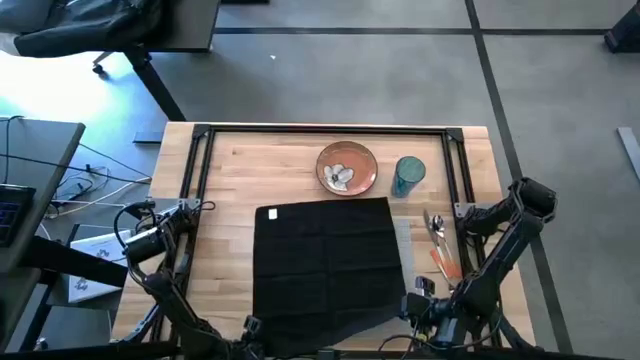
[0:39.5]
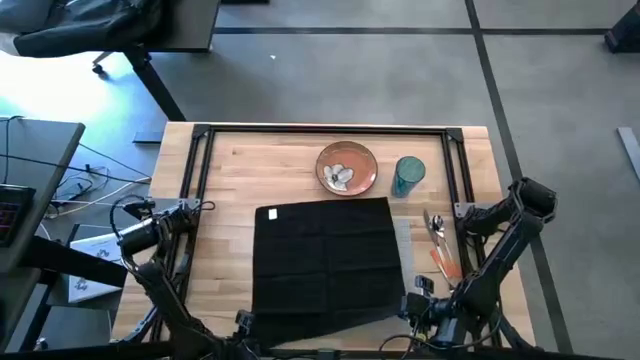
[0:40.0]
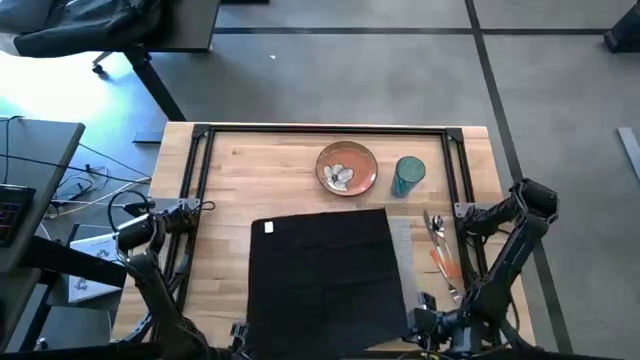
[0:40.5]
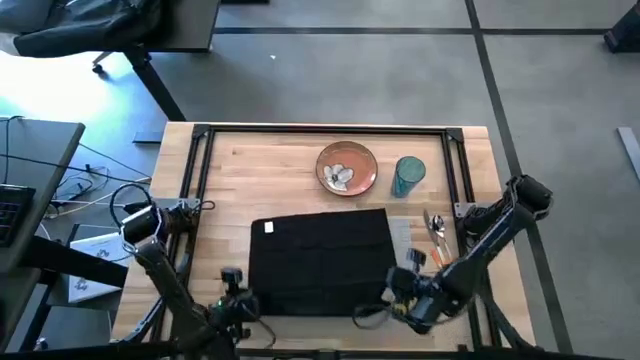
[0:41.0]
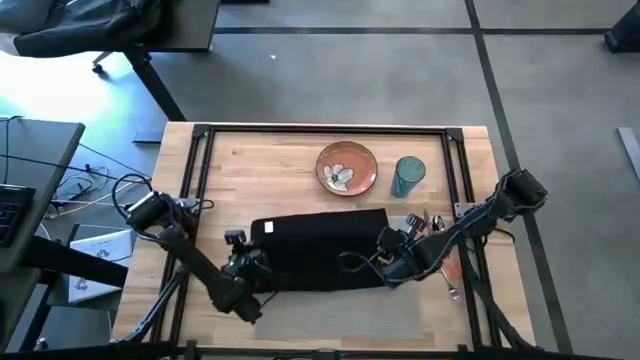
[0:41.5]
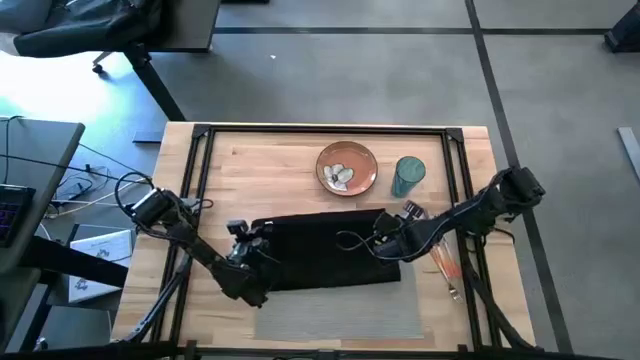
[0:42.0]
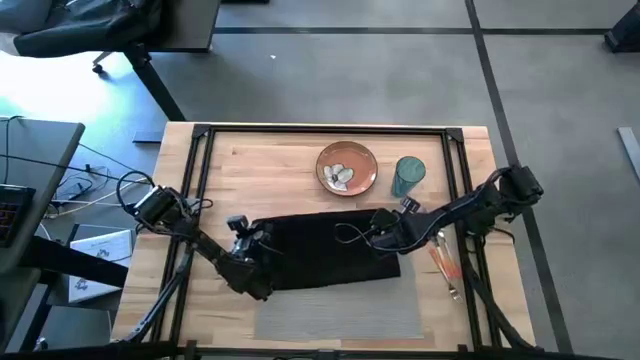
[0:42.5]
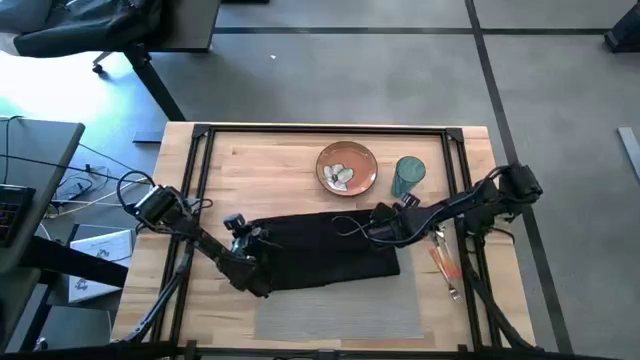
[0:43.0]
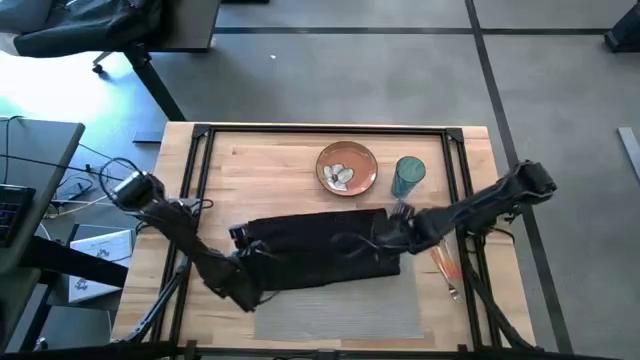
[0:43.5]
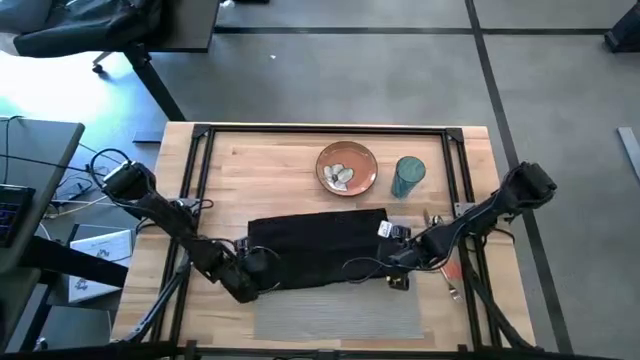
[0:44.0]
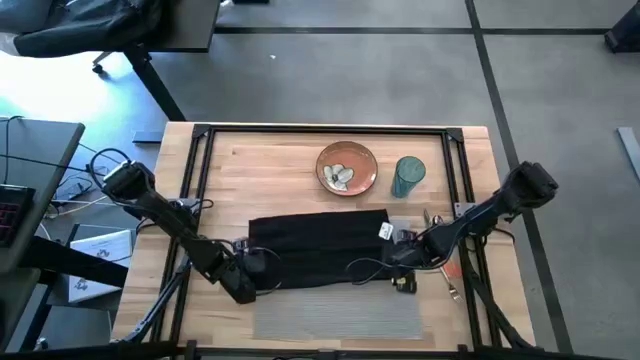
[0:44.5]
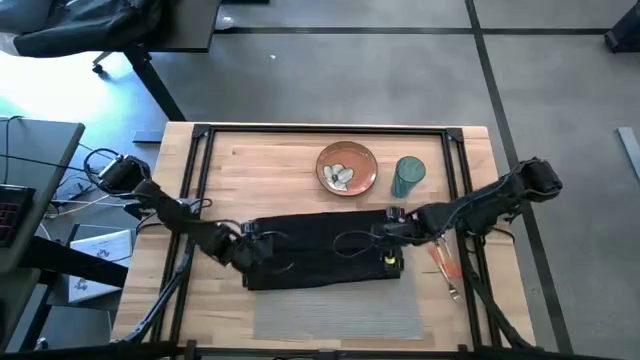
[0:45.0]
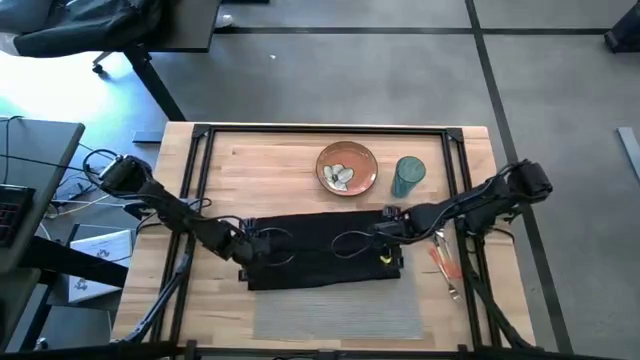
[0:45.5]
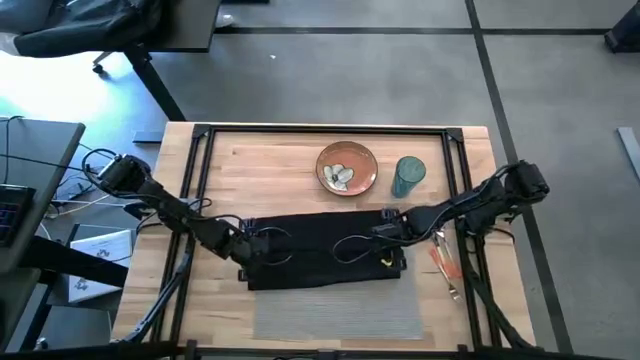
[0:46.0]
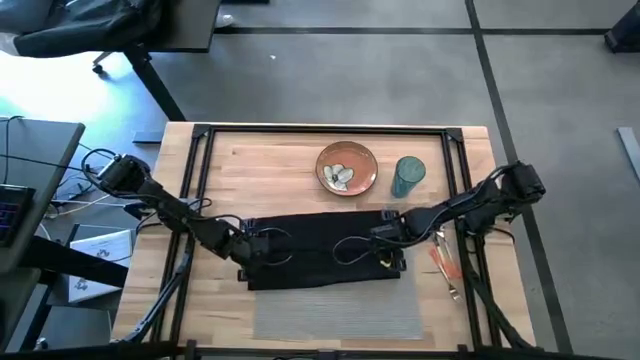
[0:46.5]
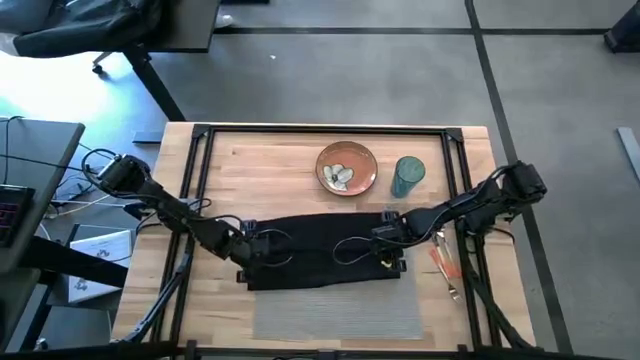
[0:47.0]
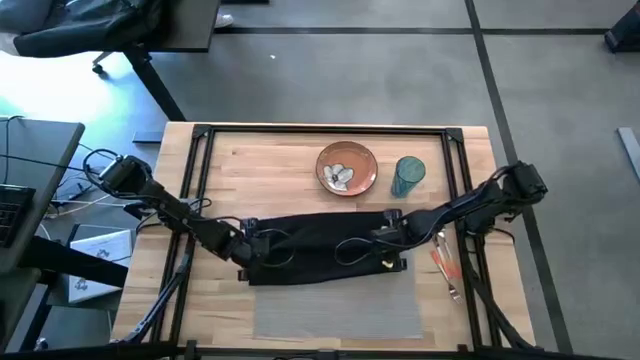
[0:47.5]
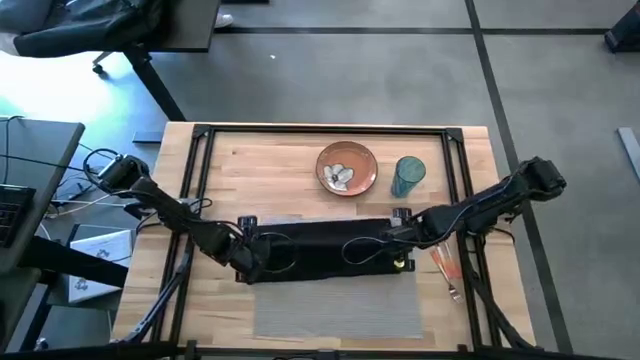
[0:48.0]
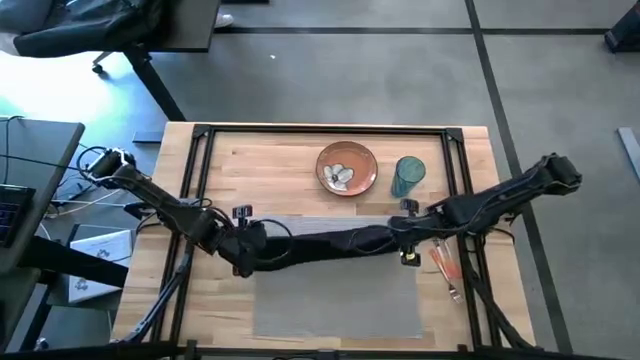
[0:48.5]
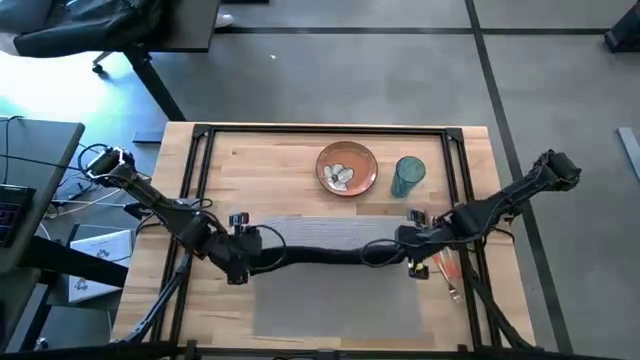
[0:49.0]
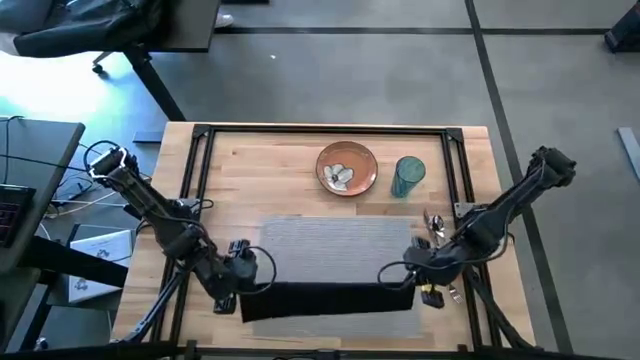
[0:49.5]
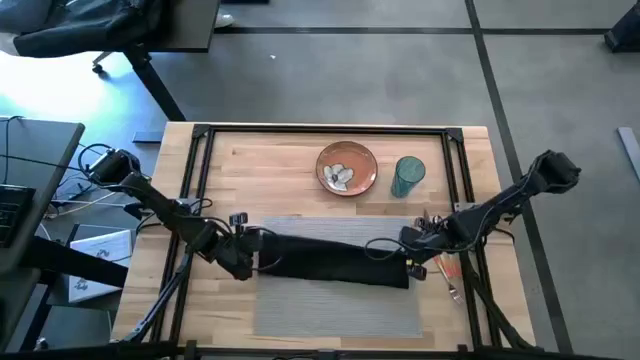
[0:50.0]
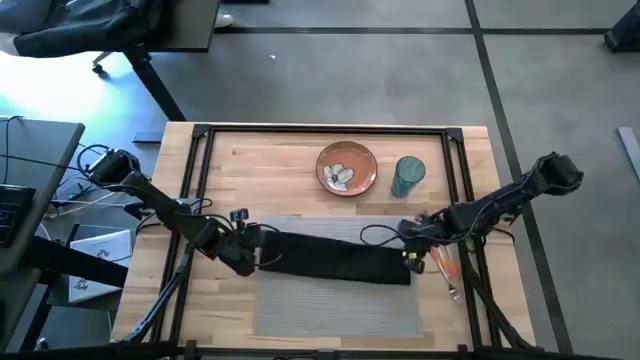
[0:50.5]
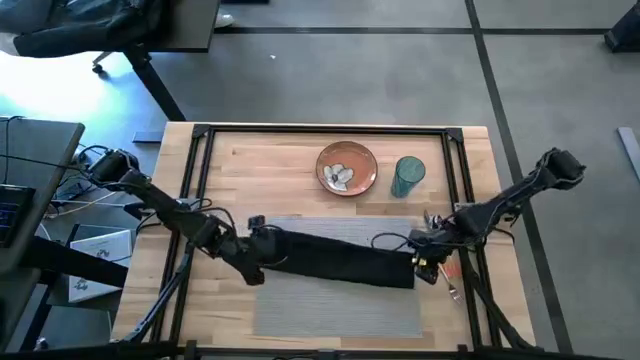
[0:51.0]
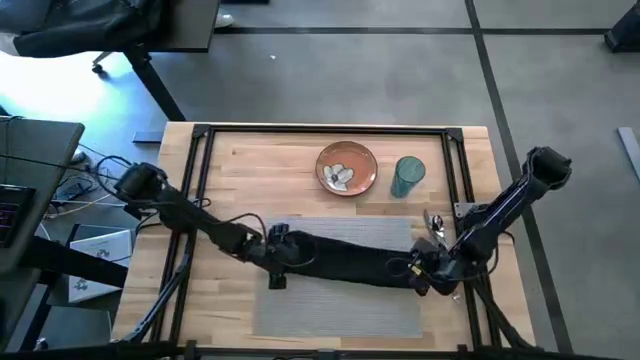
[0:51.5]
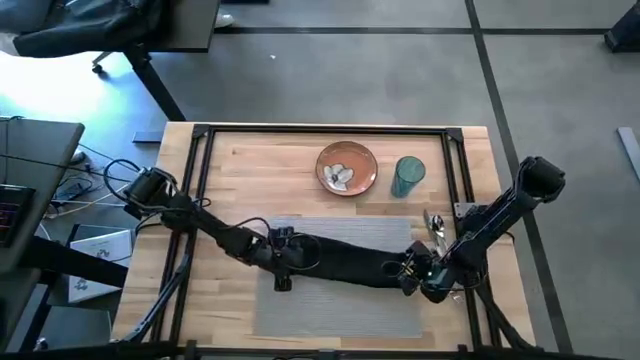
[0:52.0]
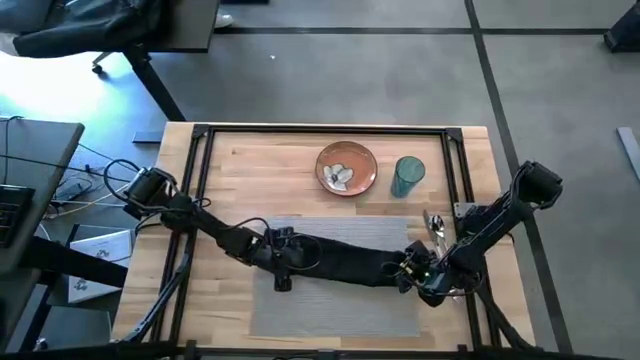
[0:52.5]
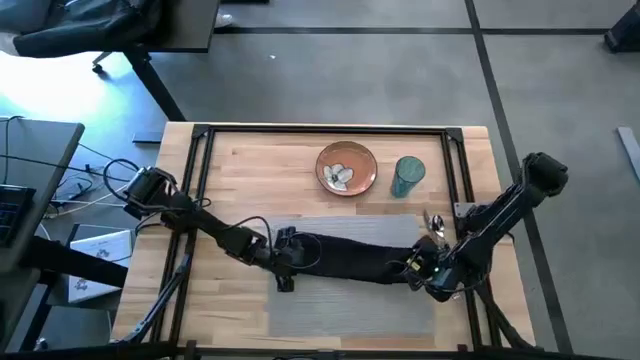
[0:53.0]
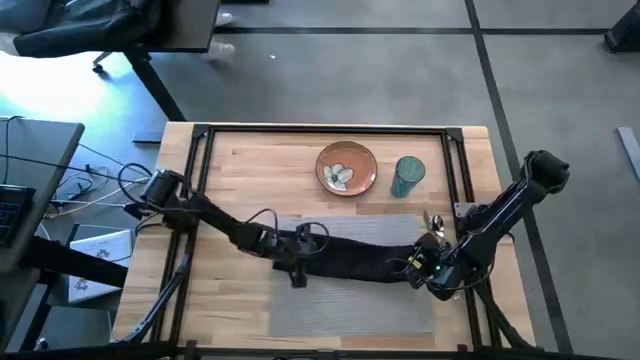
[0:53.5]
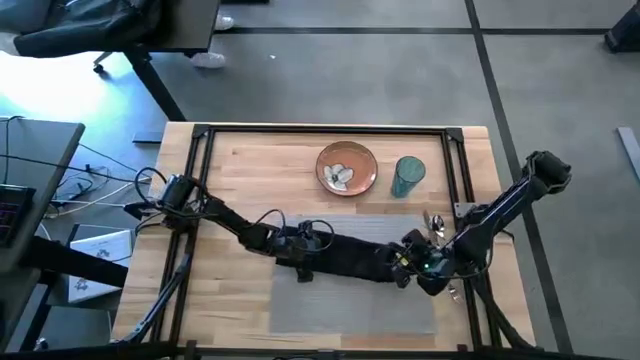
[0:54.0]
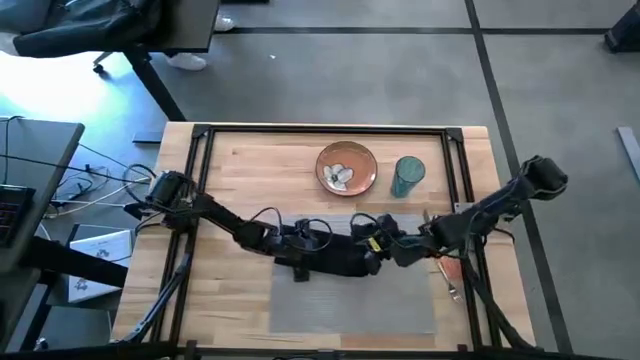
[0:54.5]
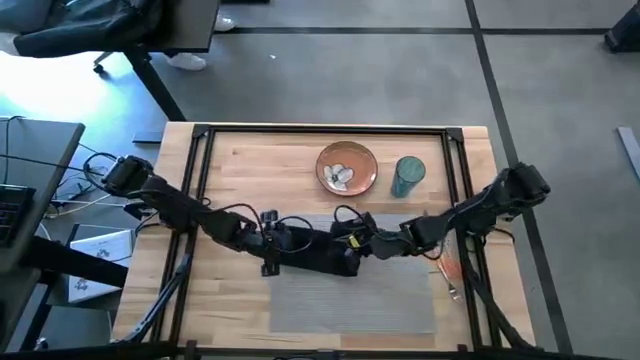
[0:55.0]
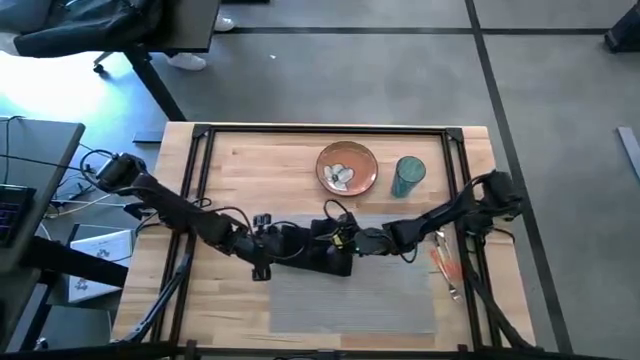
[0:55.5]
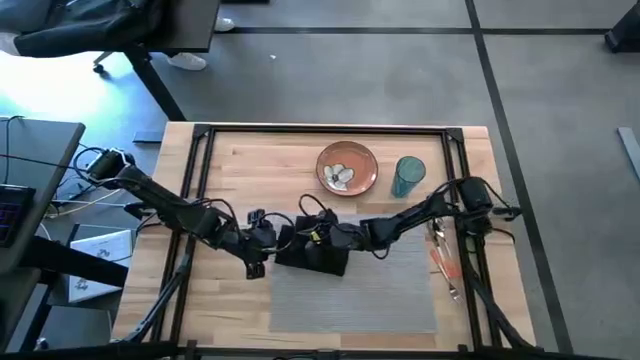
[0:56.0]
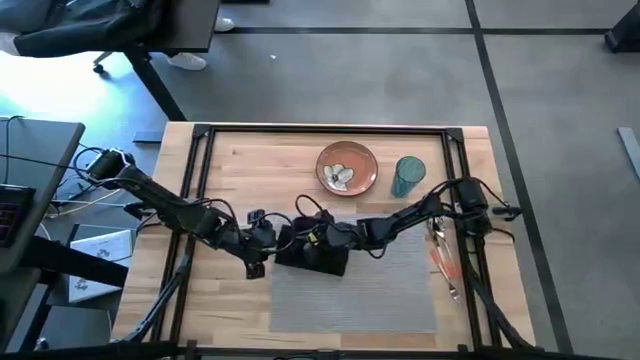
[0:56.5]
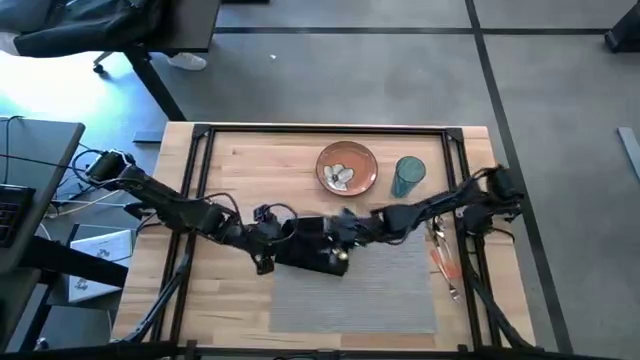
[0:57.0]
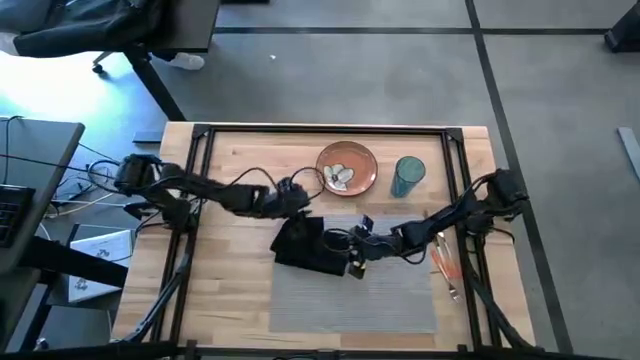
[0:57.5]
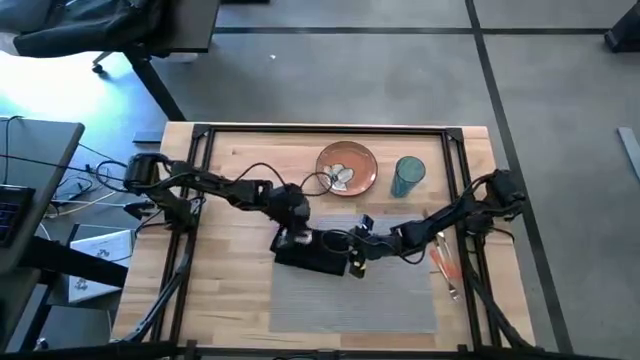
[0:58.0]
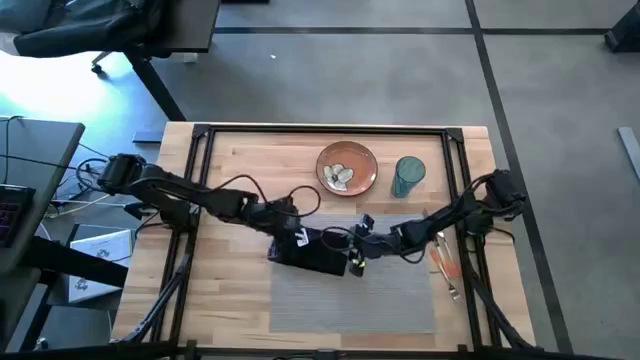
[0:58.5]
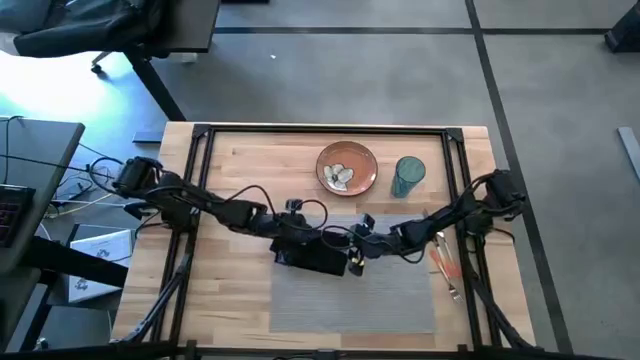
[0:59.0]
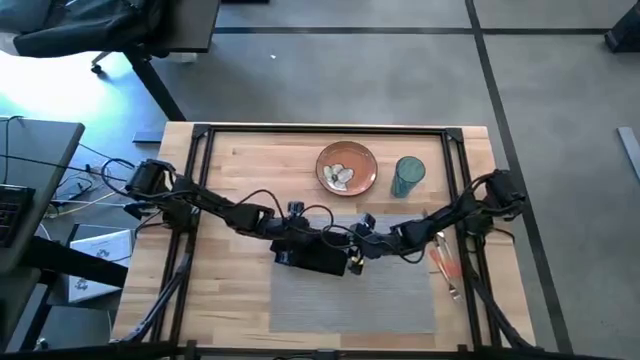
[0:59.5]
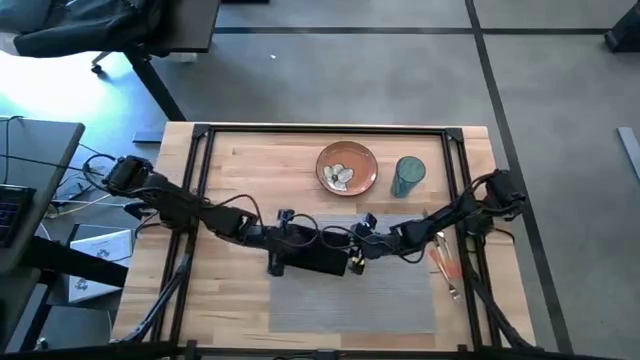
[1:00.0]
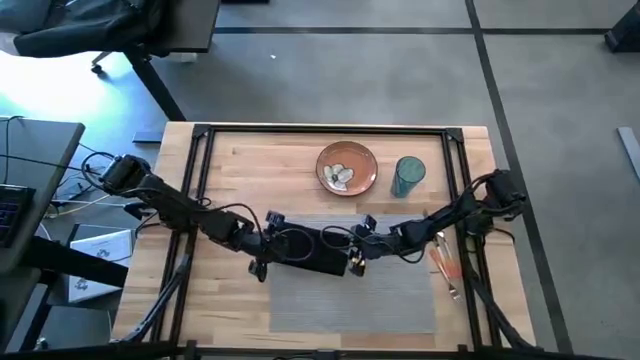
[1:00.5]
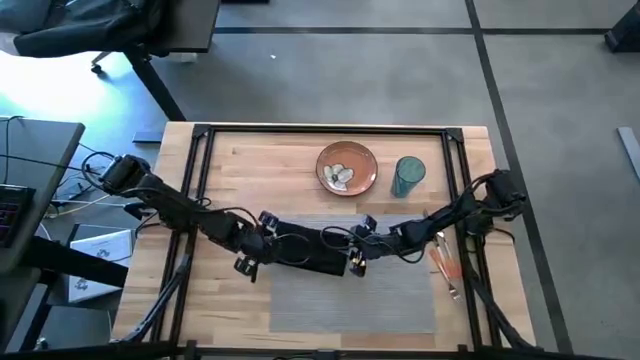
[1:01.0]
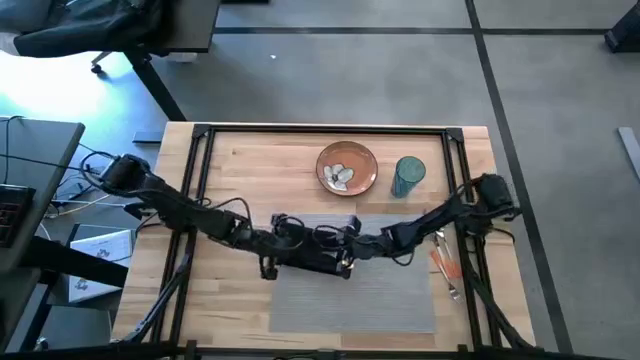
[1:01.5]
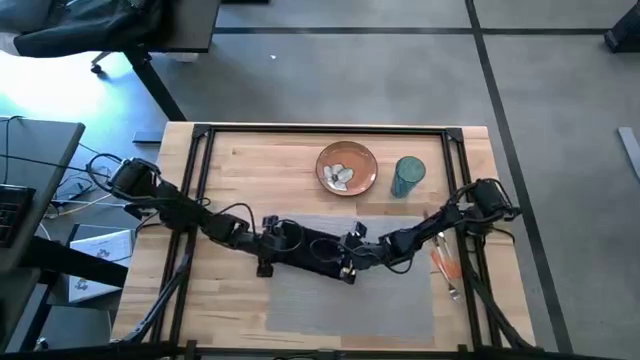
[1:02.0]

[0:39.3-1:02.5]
Task: Set table place
Fold the black table napkin on the gray tablemat
